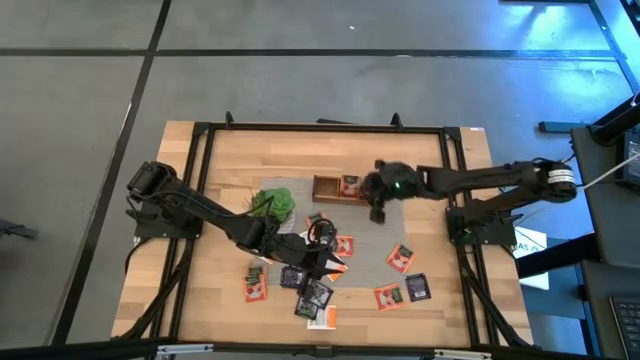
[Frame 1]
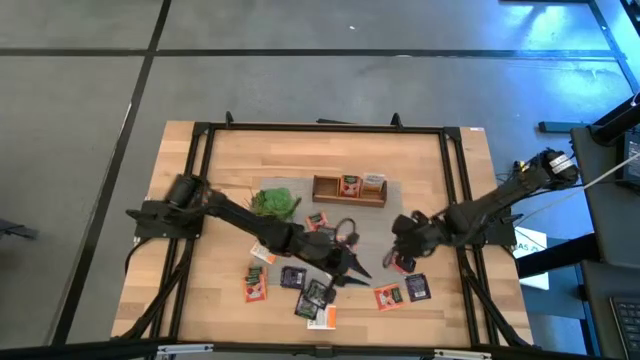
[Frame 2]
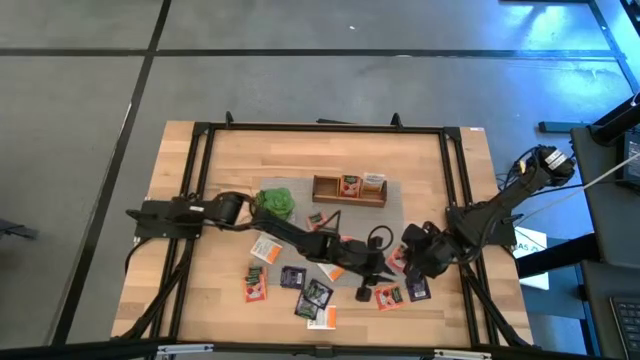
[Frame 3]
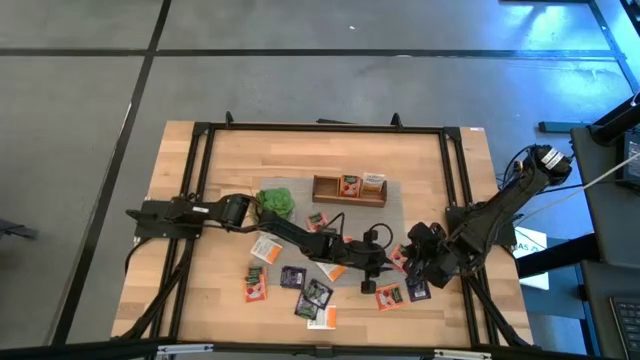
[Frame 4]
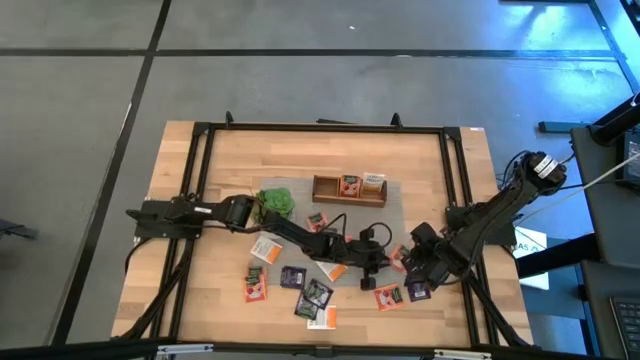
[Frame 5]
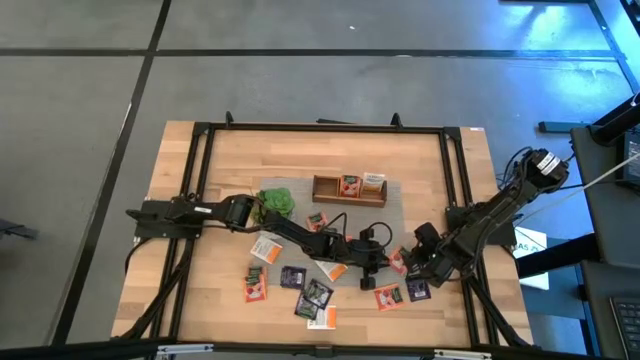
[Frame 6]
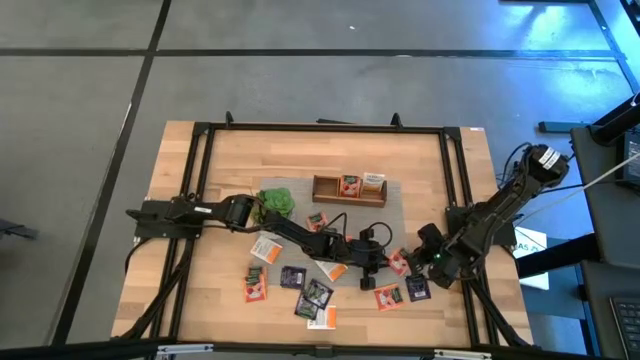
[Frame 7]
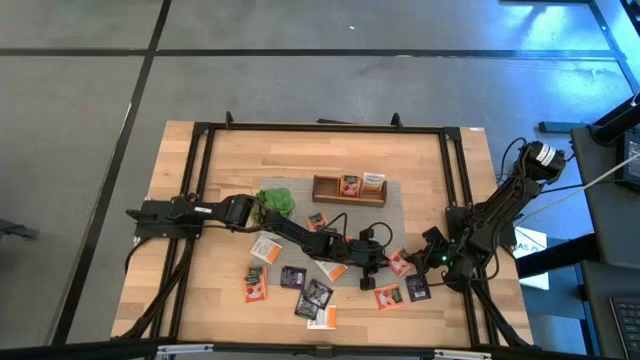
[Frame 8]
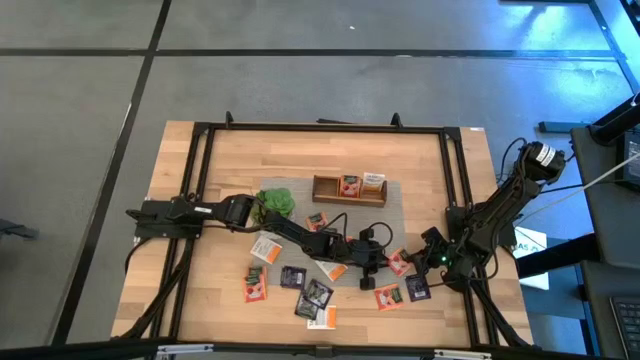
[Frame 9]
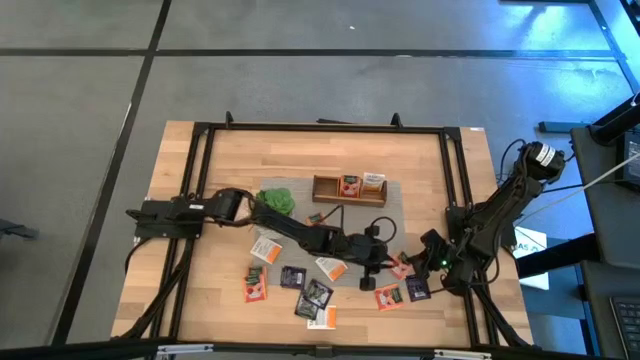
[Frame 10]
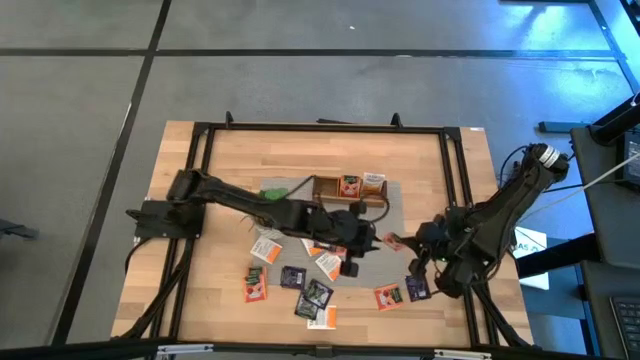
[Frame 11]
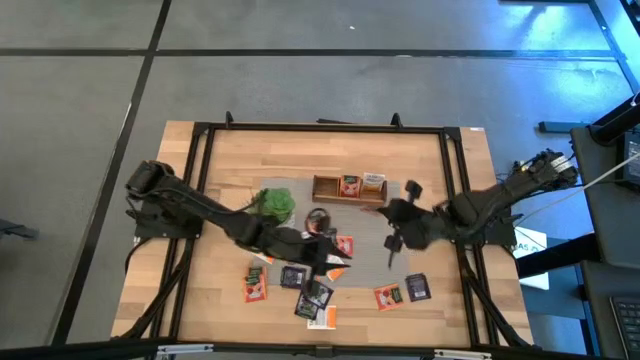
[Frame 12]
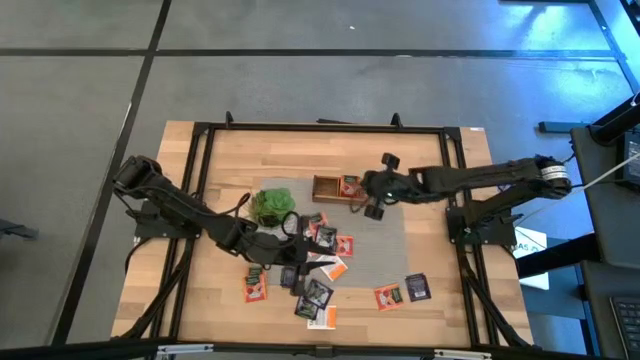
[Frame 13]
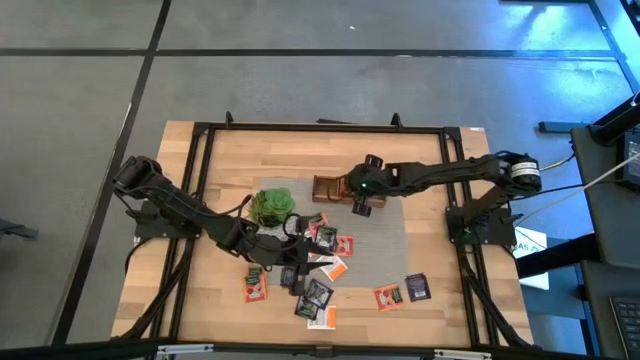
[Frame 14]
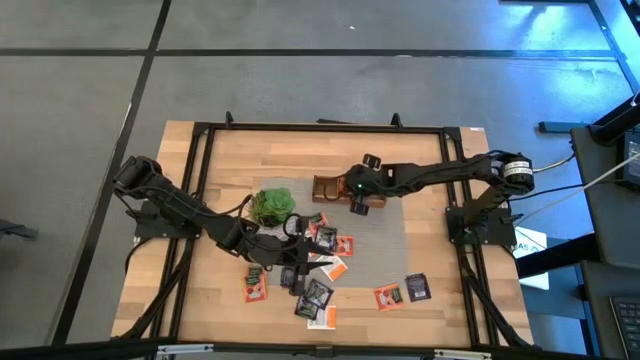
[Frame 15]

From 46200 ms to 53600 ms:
Task: Pick & Place Tea
Put the orange tea bag into the middle section of the wooden organizer

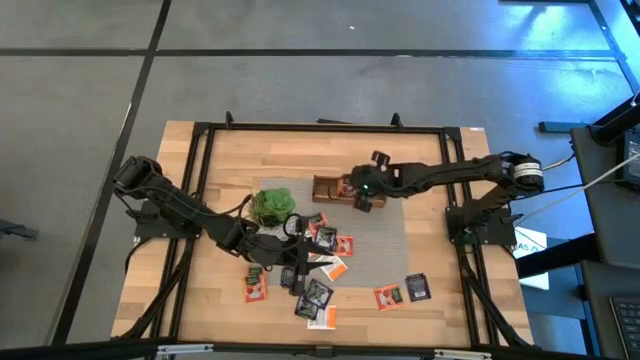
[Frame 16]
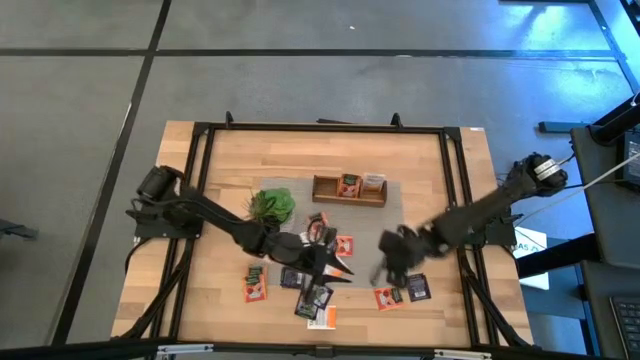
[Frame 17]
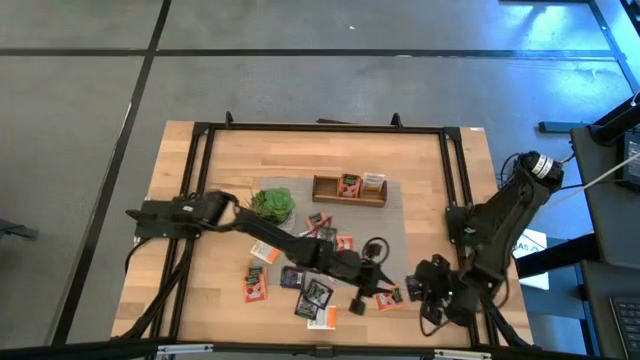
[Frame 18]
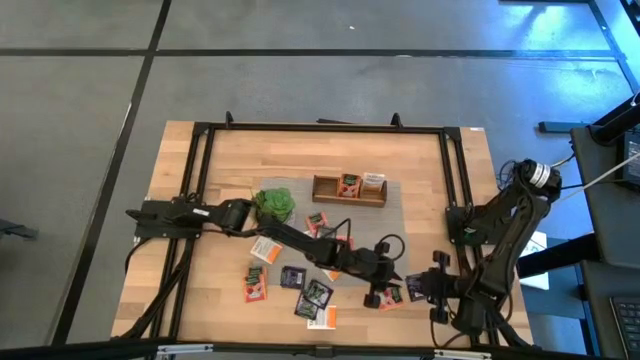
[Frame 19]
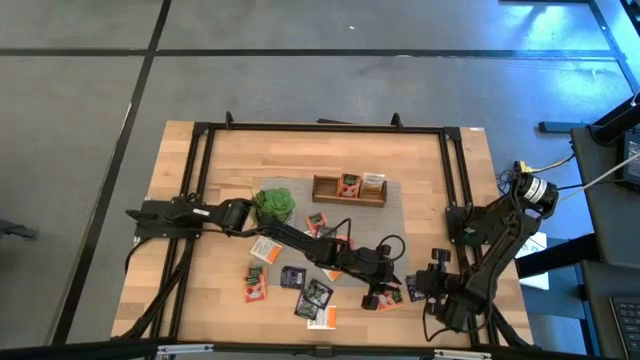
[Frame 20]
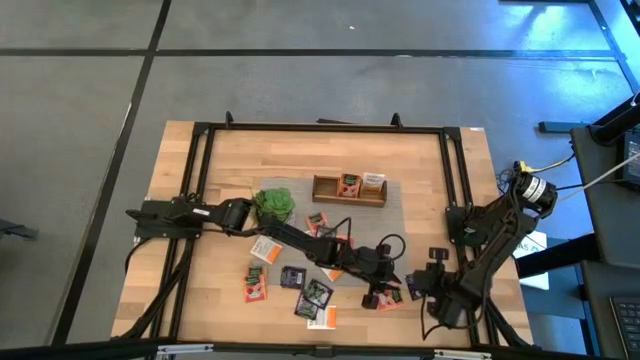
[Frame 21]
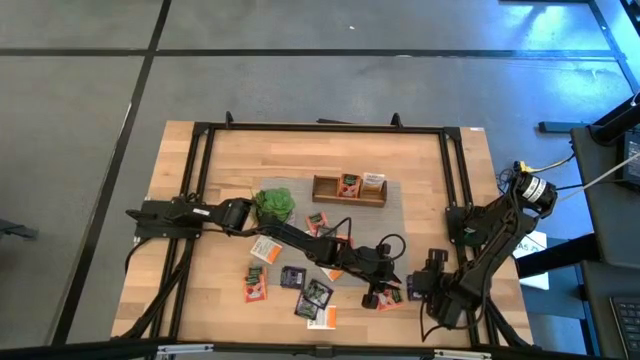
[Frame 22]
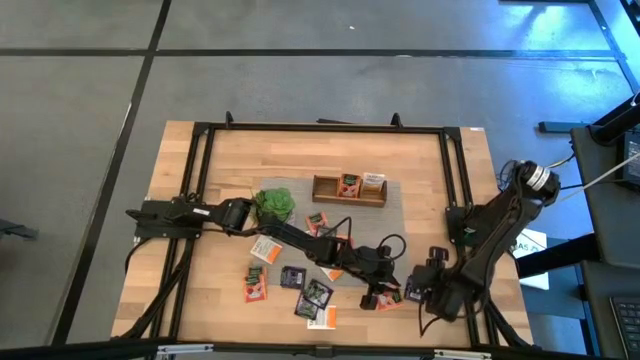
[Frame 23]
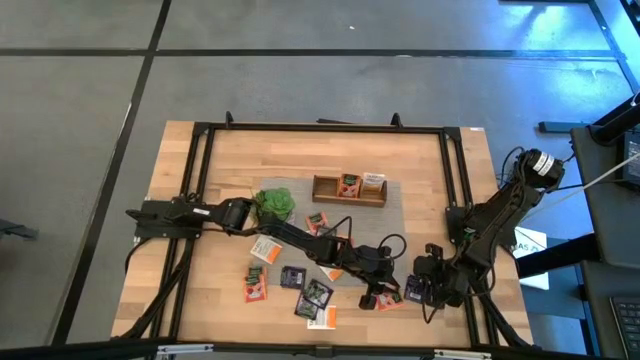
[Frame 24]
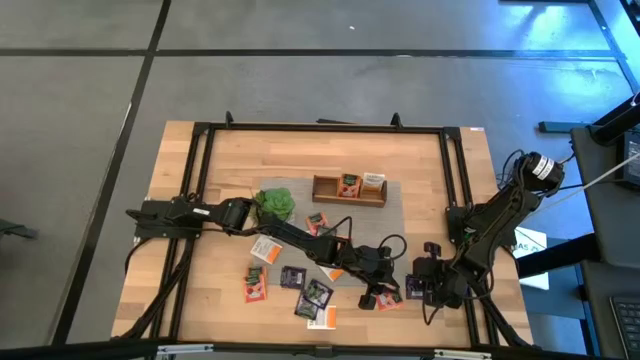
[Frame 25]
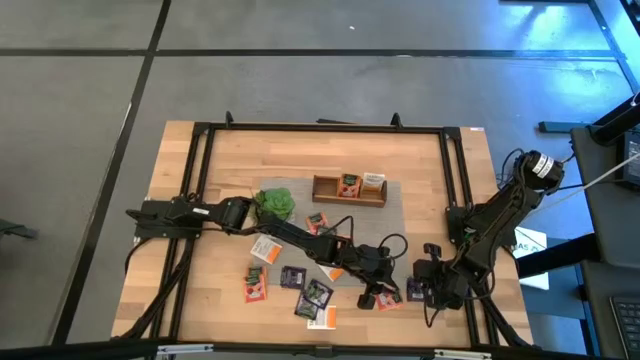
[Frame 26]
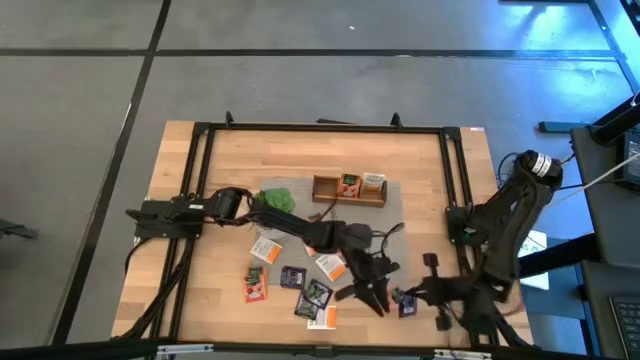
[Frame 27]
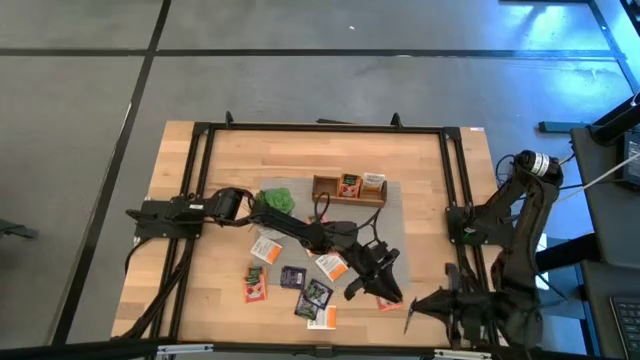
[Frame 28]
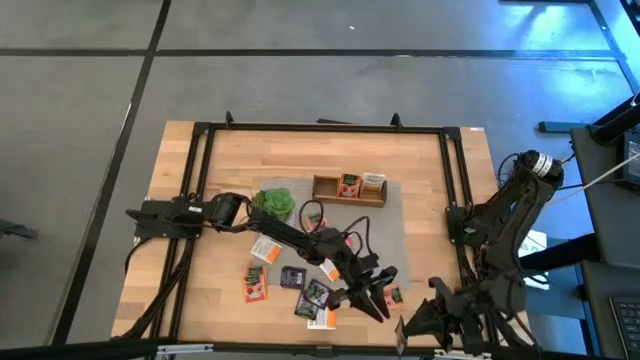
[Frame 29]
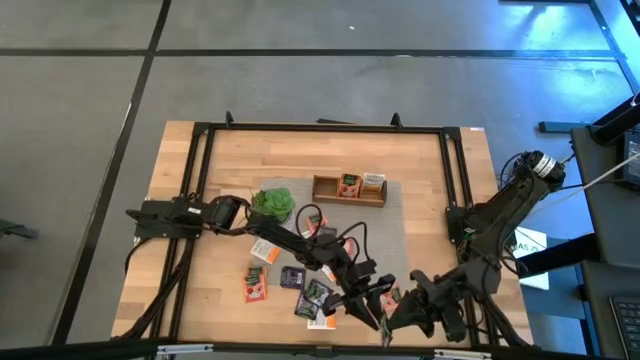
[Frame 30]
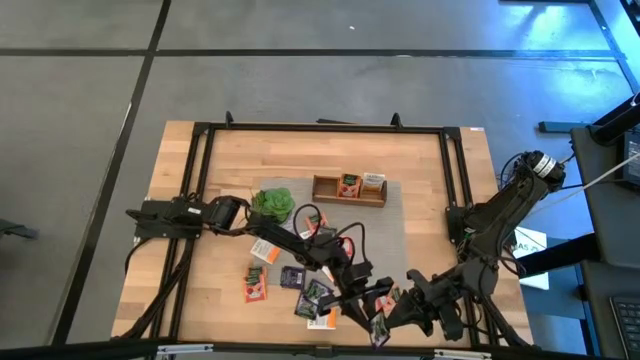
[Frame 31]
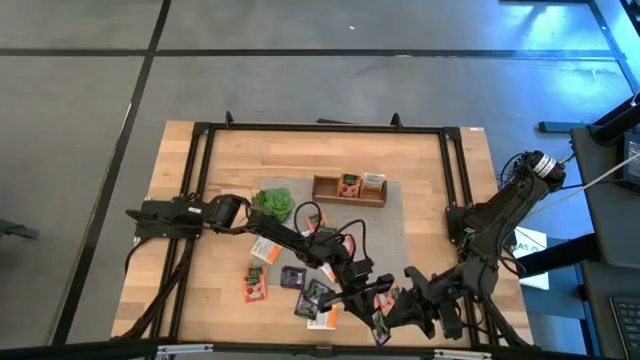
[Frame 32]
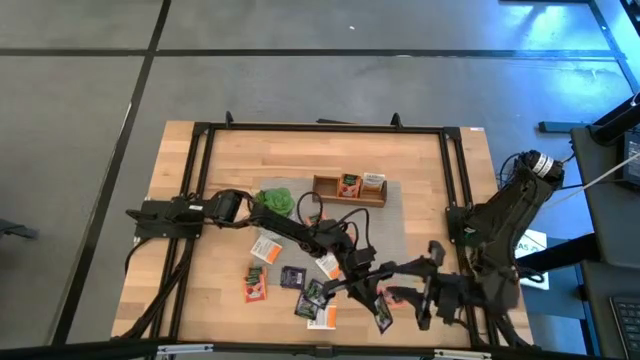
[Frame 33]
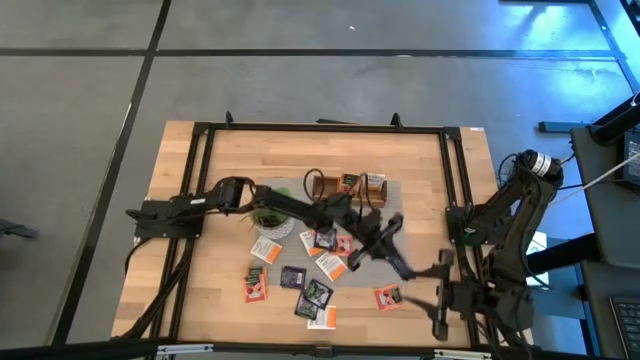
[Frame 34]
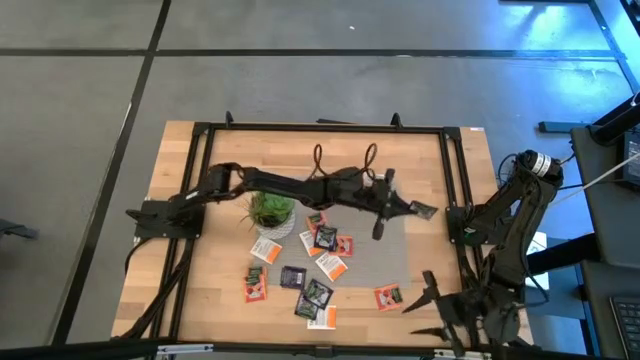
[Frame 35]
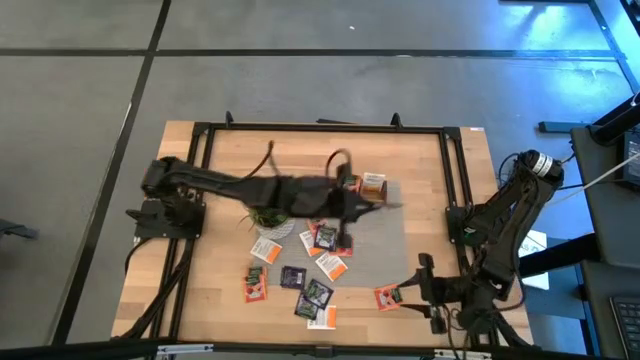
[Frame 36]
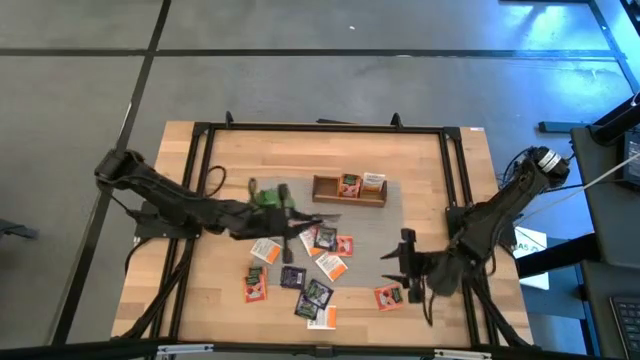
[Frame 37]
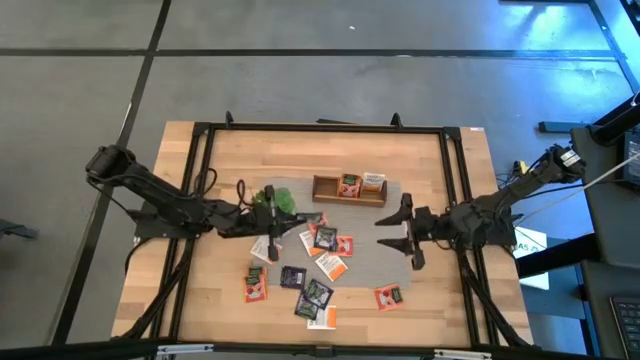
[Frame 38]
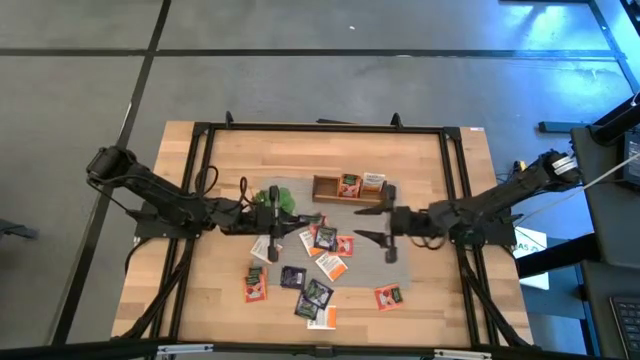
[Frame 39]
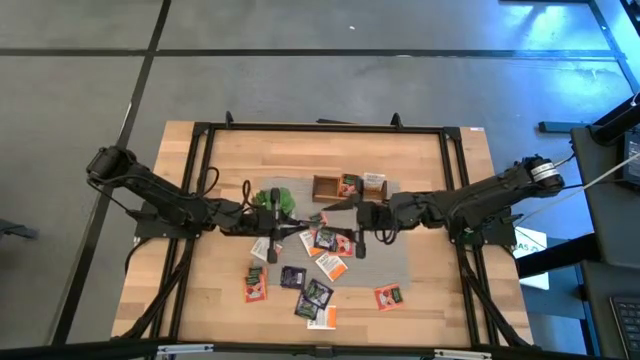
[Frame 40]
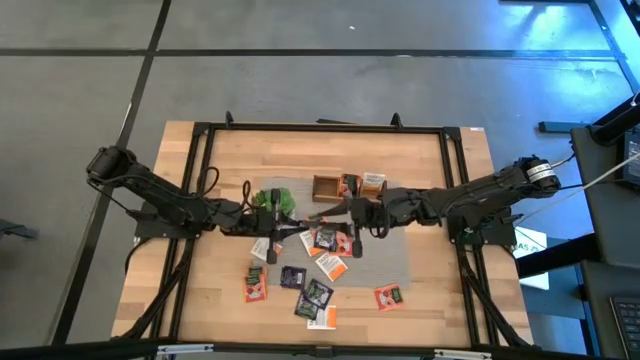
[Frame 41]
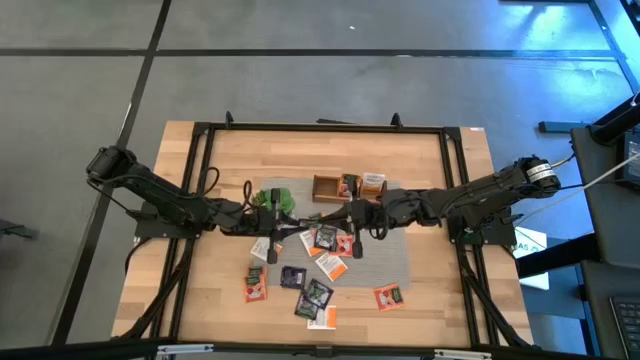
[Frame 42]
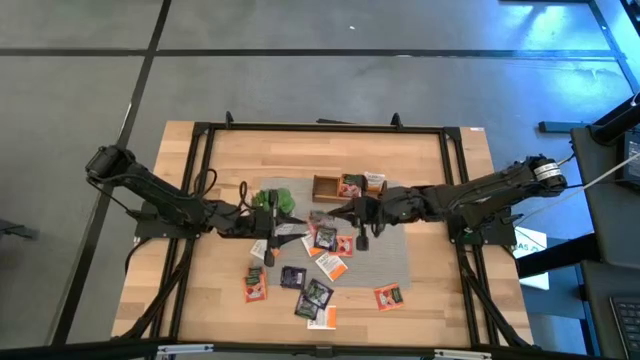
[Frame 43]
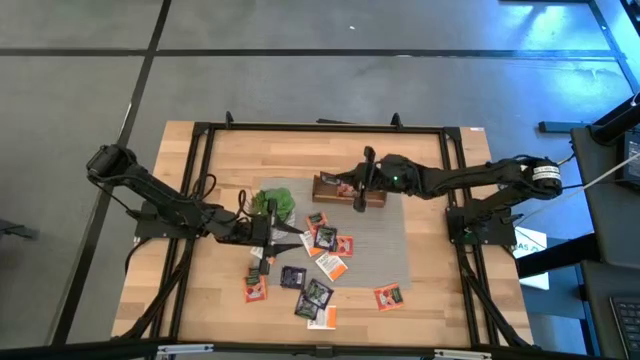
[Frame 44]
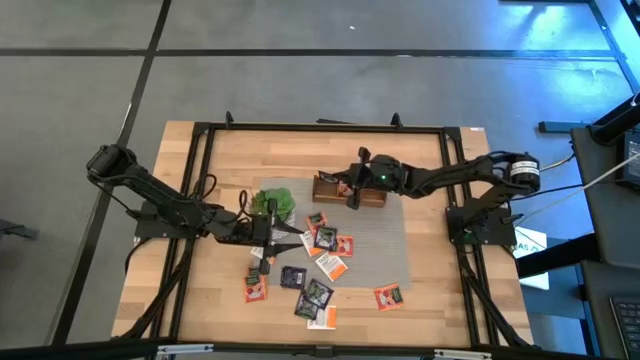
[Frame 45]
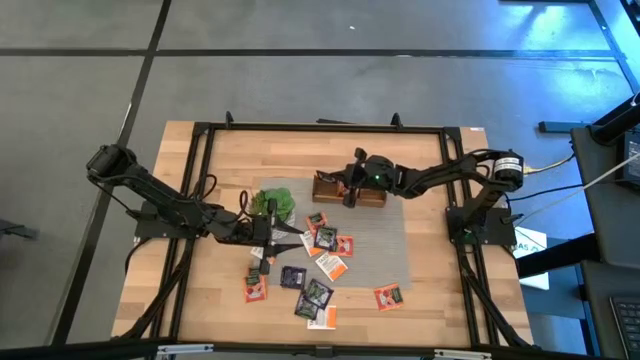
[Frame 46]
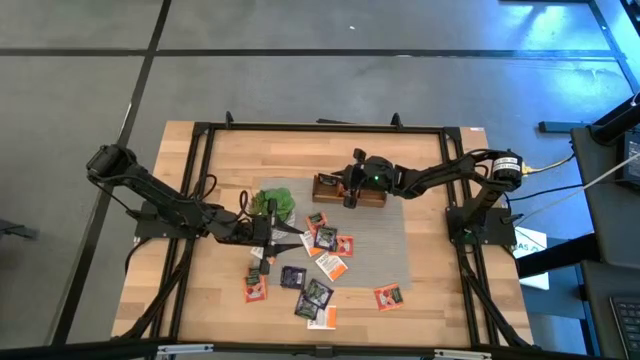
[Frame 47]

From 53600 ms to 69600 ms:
Put the violet tea bag into the left section of the wooden organizer
